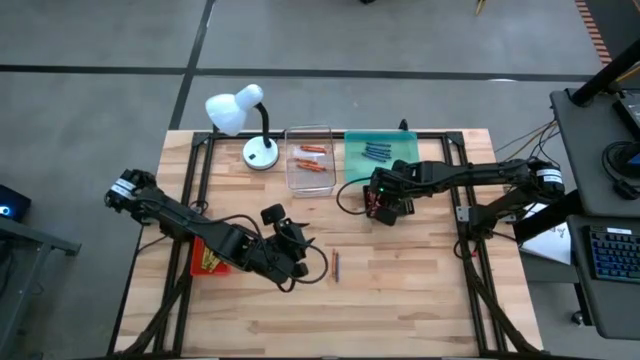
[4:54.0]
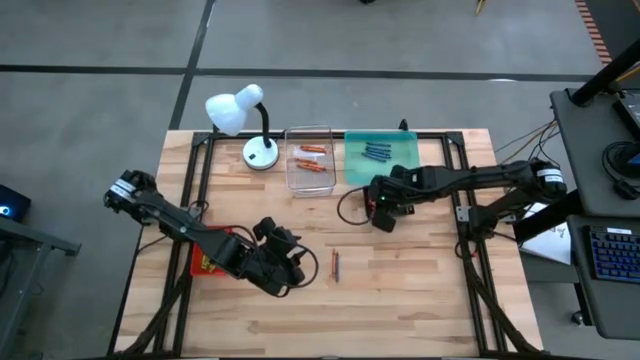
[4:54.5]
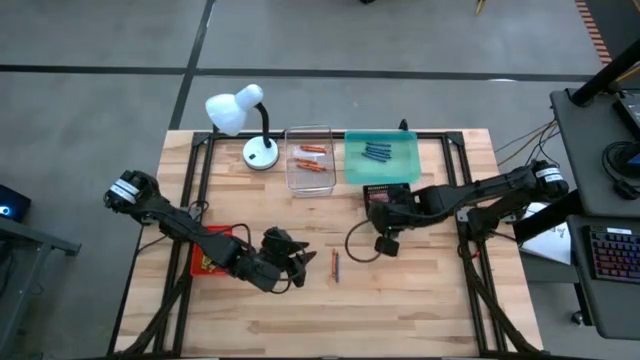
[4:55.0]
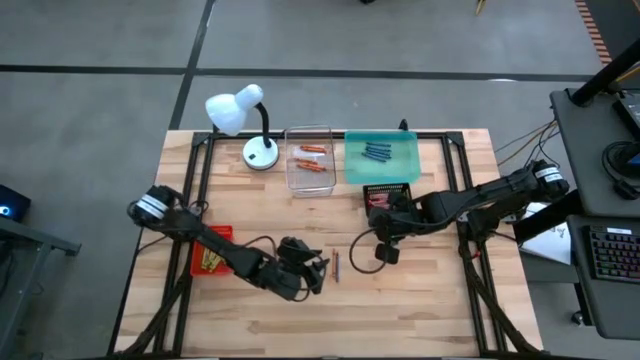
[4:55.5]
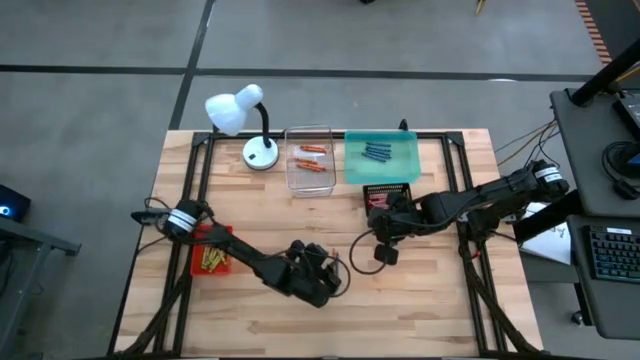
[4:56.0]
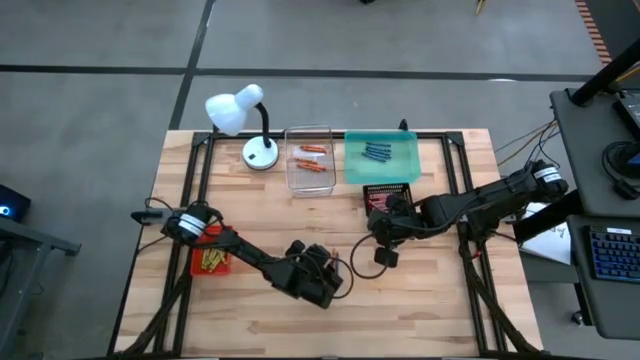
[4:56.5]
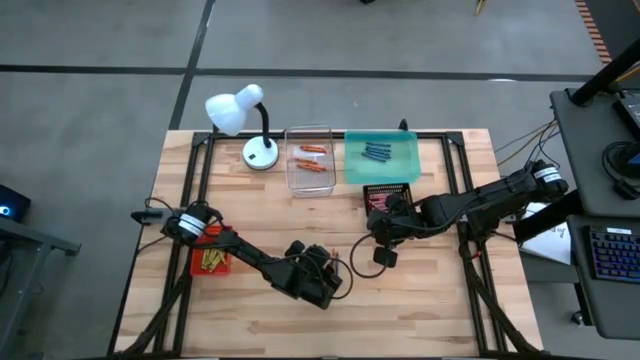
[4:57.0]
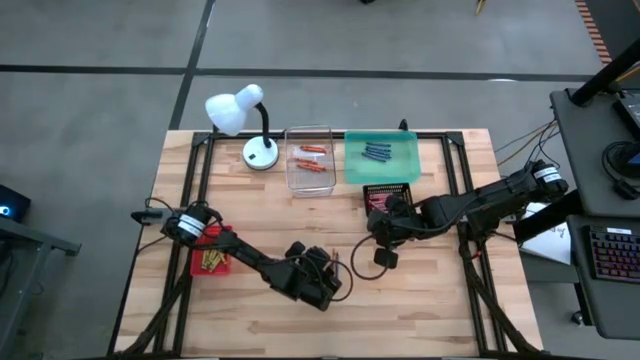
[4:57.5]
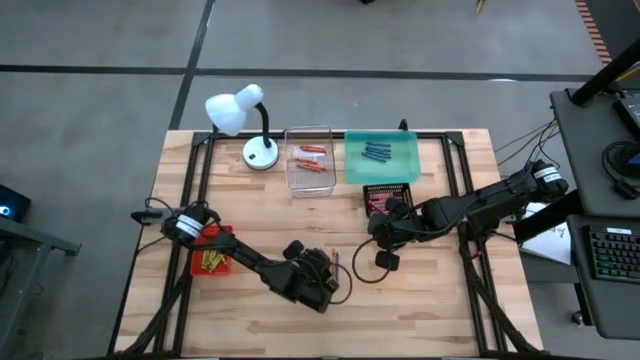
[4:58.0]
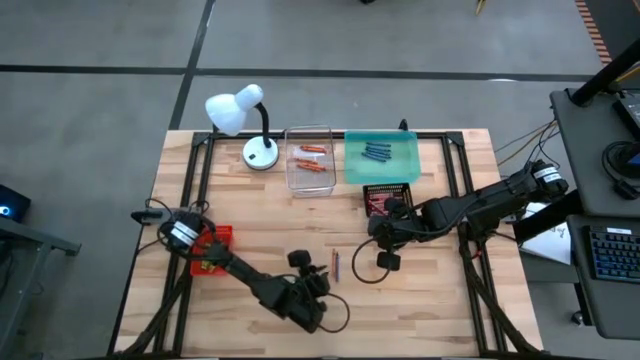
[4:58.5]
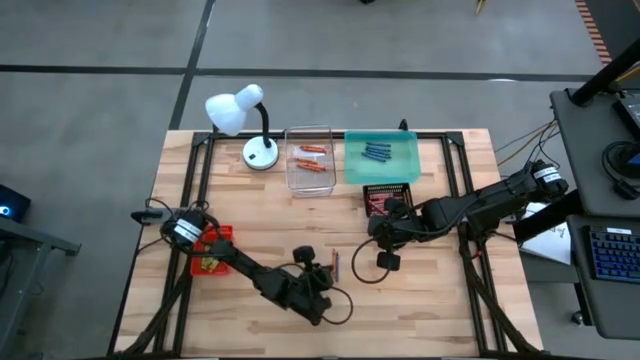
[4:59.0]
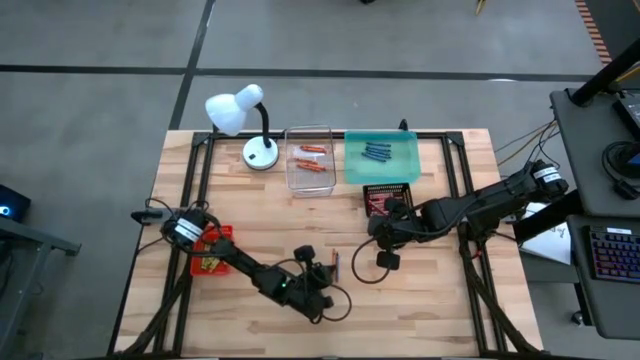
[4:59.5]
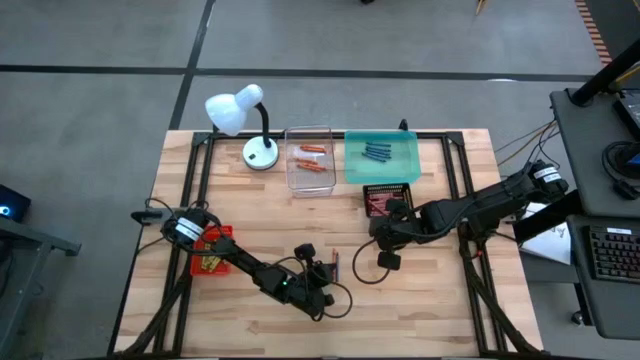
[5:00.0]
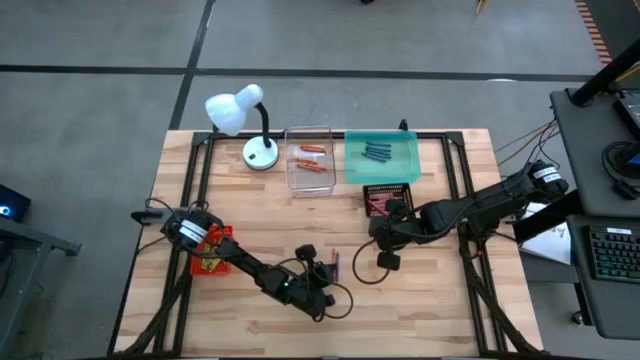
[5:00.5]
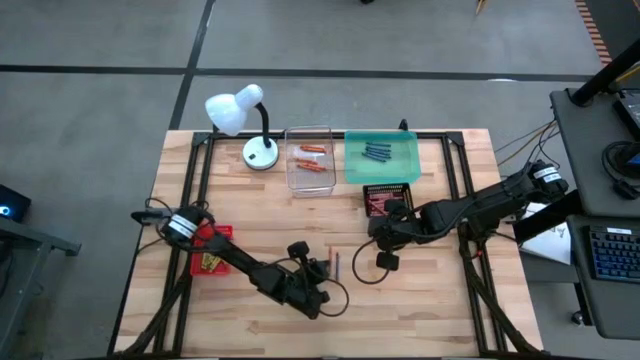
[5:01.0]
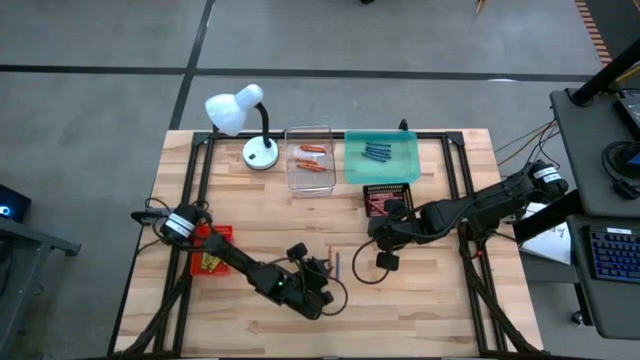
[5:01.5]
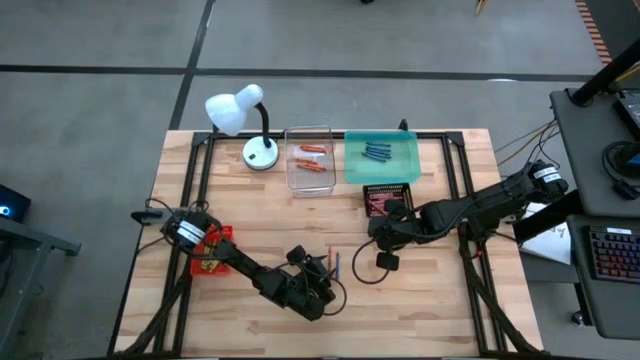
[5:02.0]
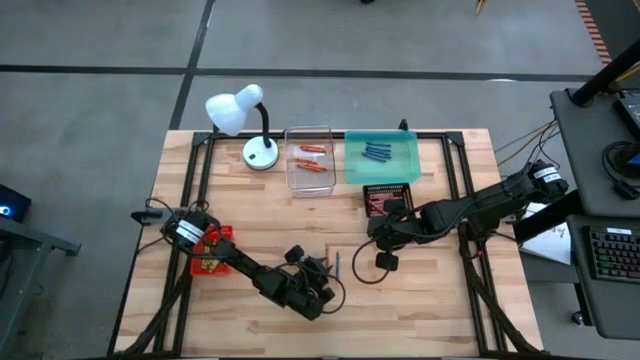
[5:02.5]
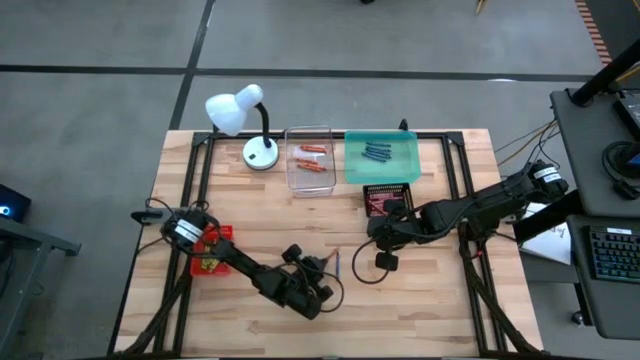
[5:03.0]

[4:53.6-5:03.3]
Task: Sort crayons
Put the orange crayon into the transparent bin

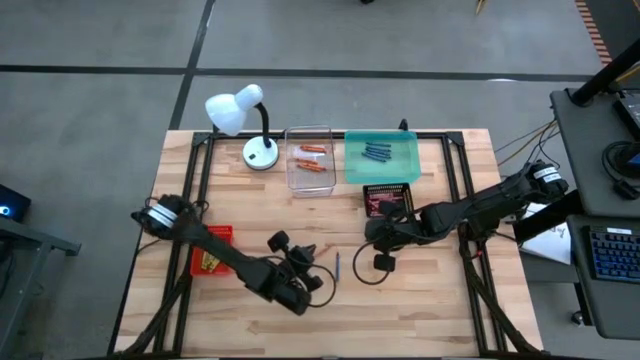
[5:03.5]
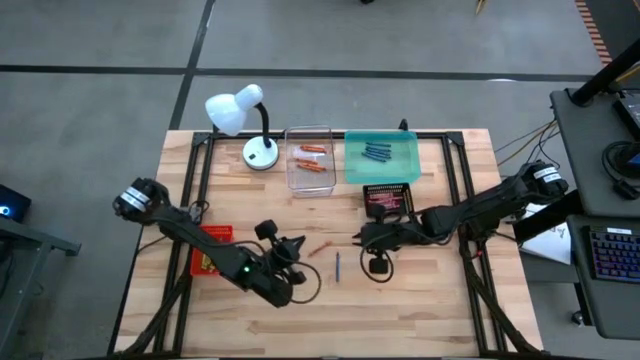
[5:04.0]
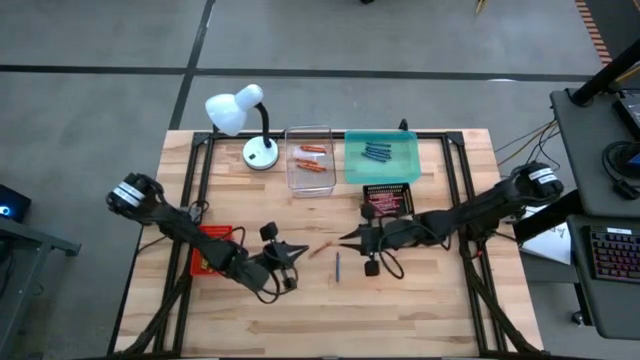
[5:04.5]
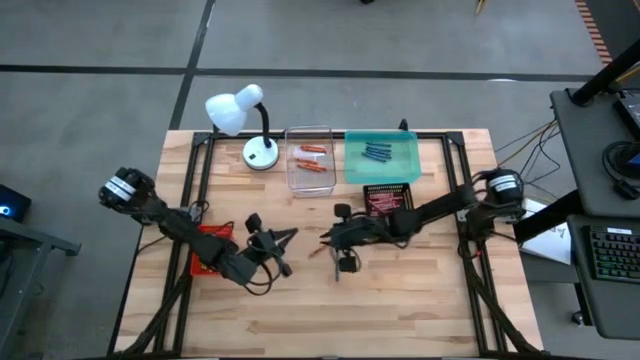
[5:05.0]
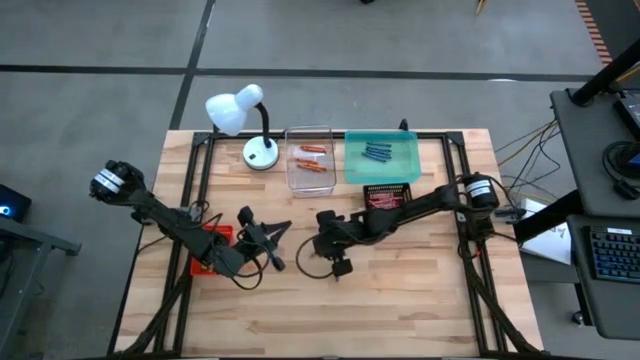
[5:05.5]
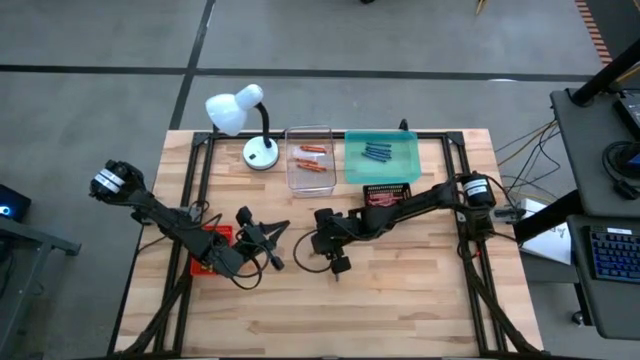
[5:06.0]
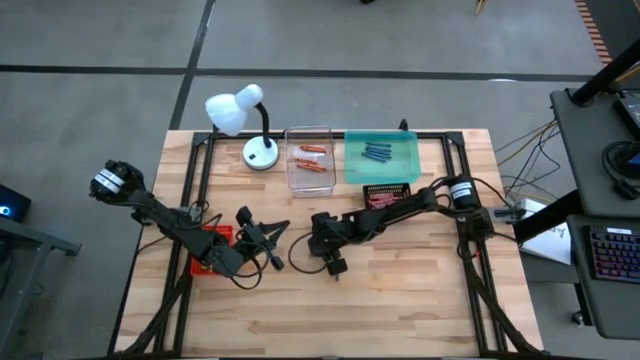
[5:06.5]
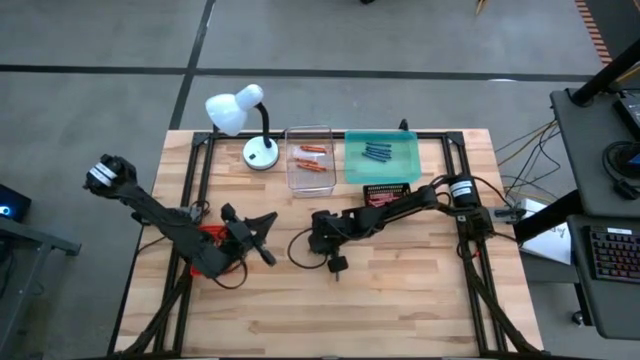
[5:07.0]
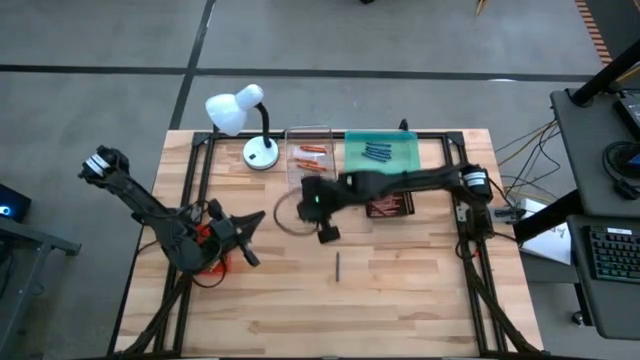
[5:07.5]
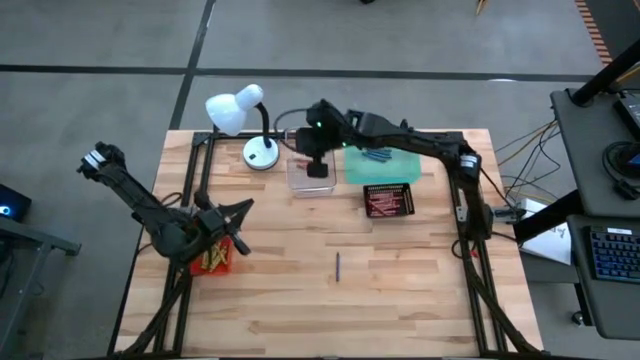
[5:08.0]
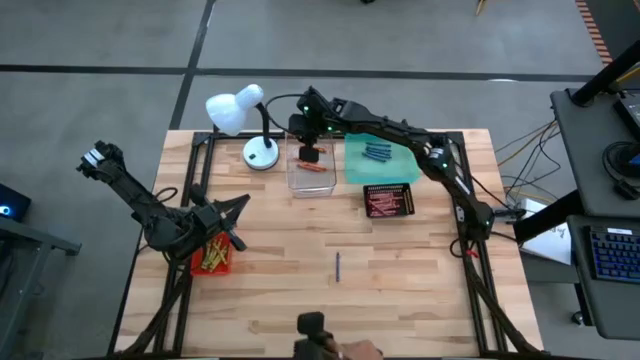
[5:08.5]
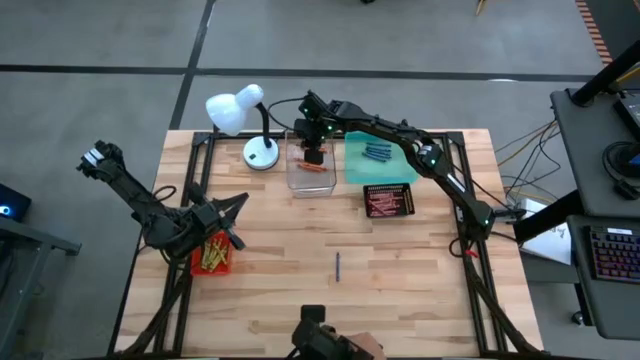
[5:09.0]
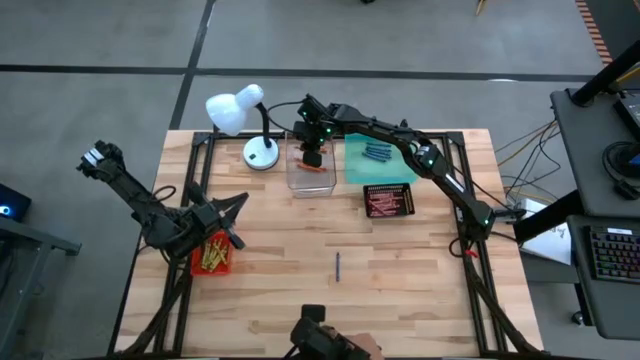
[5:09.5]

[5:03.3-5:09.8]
Put the orange crayon into the transparent bin

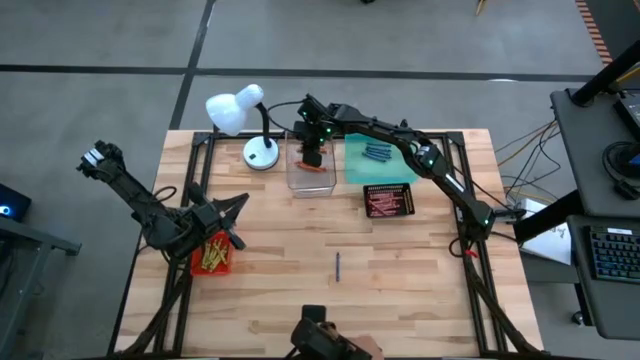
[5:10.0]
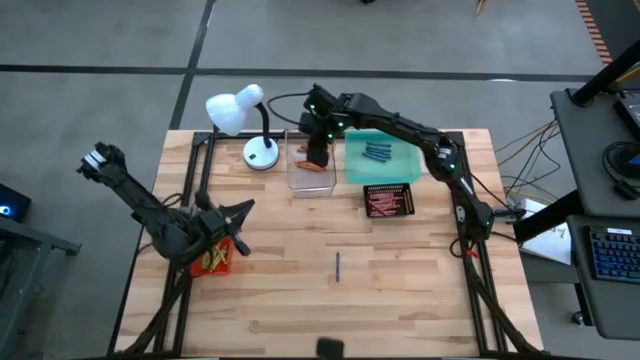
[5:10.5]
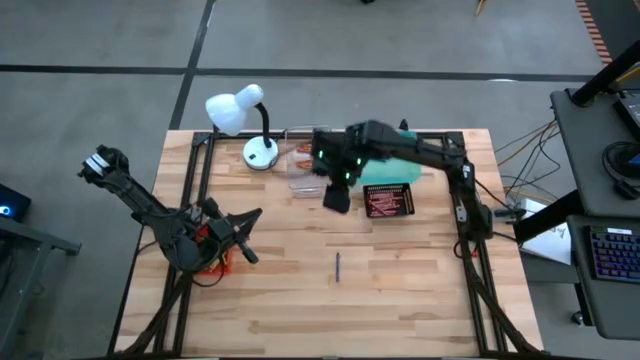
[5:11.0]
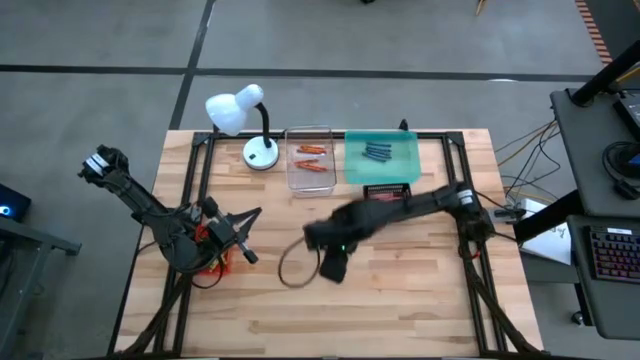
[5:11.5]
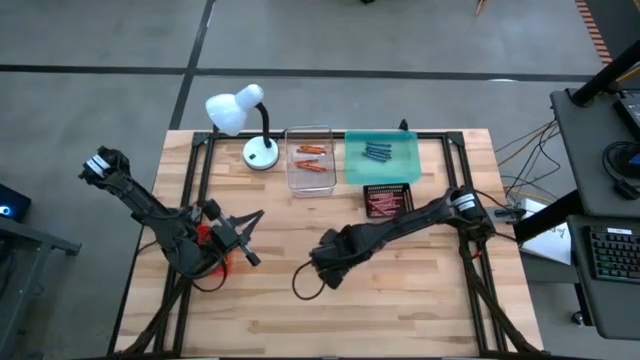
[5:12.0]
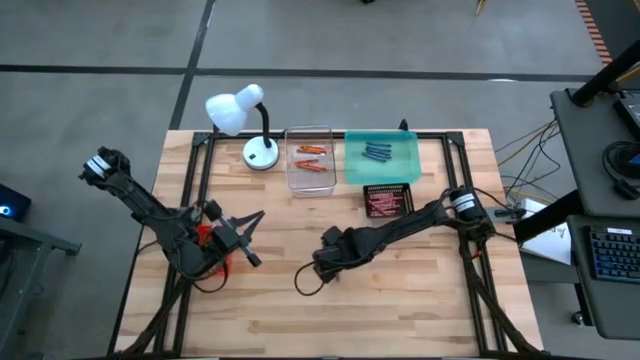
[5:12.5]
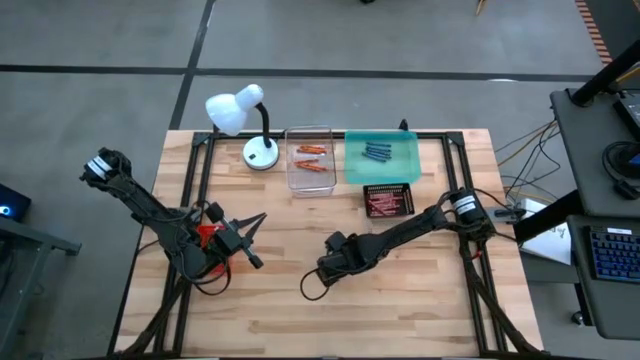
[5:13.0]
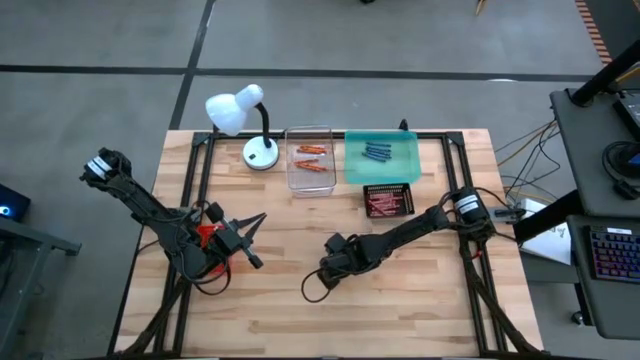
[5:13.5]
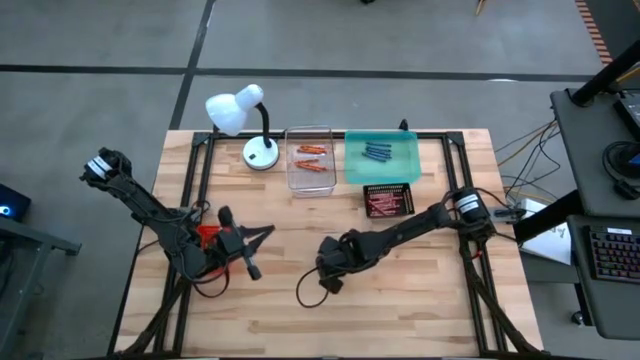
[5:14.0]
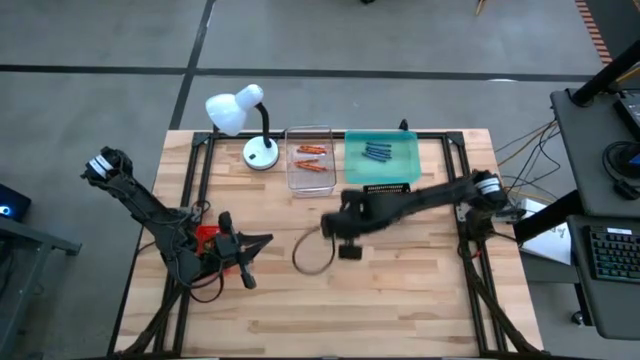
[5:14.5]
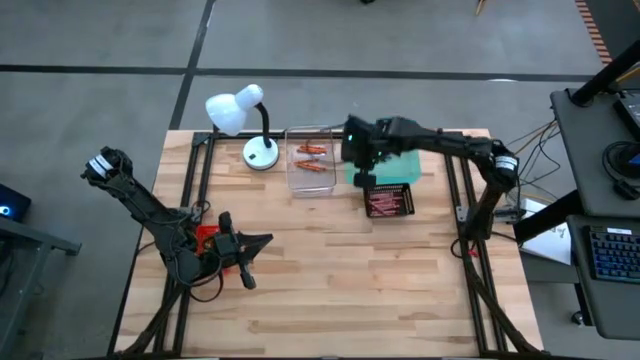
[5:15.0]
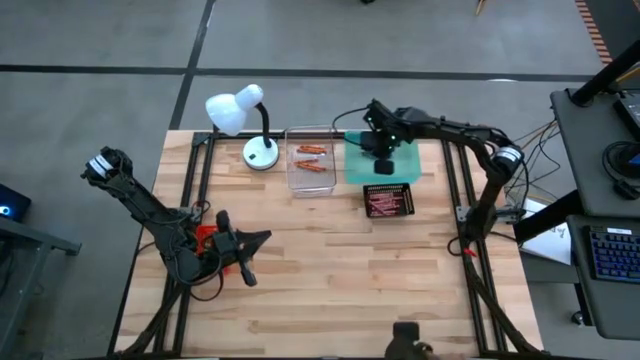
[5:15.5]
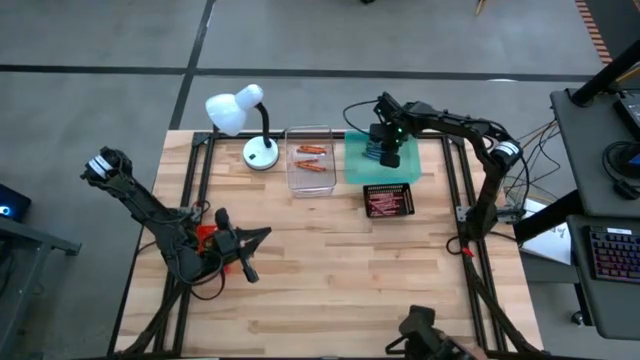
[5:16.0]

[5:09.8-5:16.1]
Put the blue crayon into the blue bin
